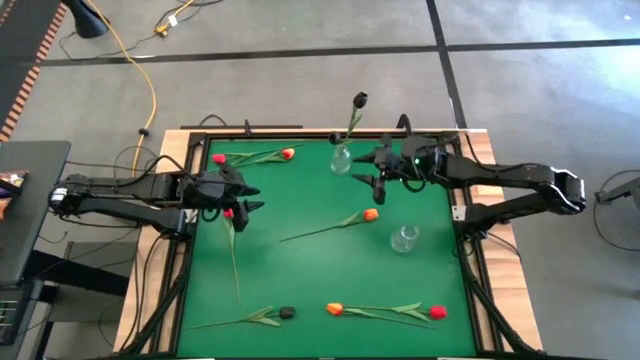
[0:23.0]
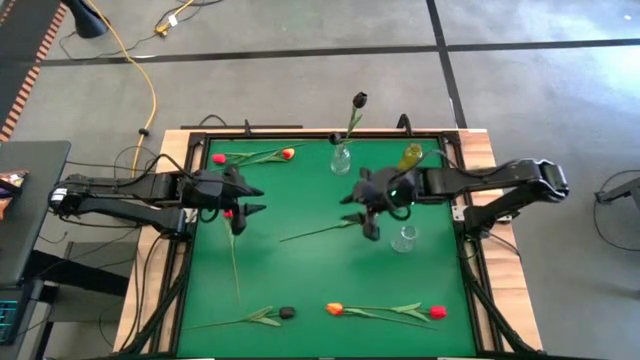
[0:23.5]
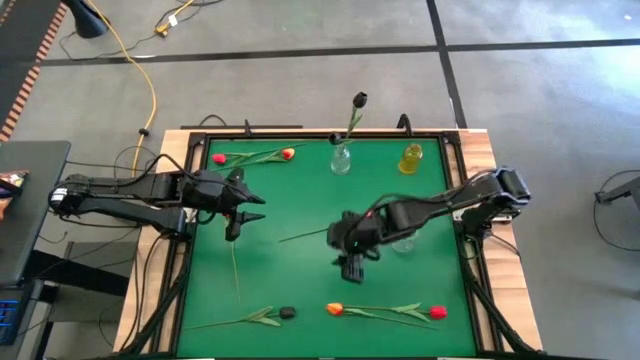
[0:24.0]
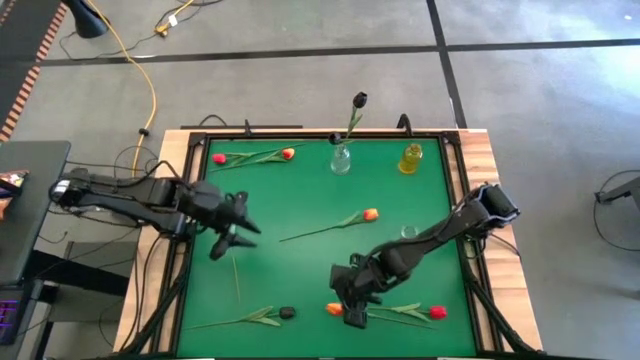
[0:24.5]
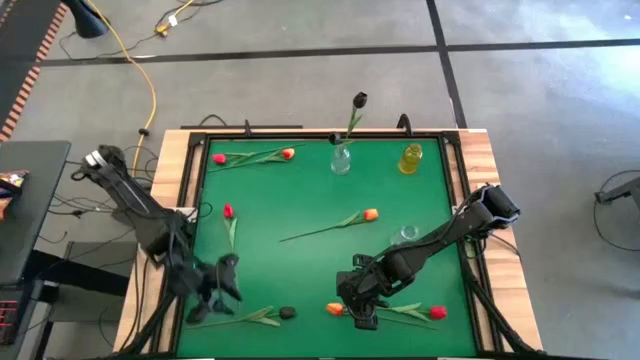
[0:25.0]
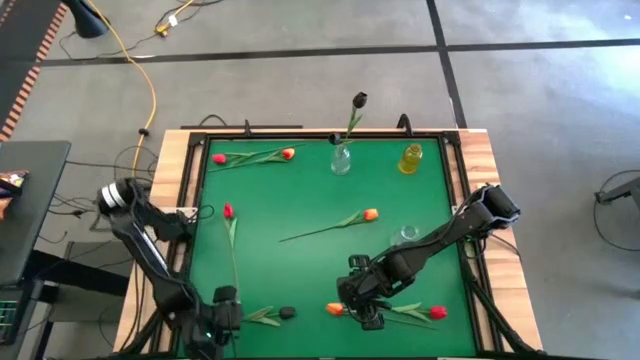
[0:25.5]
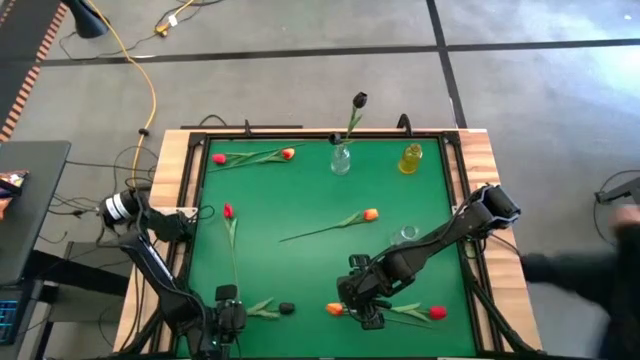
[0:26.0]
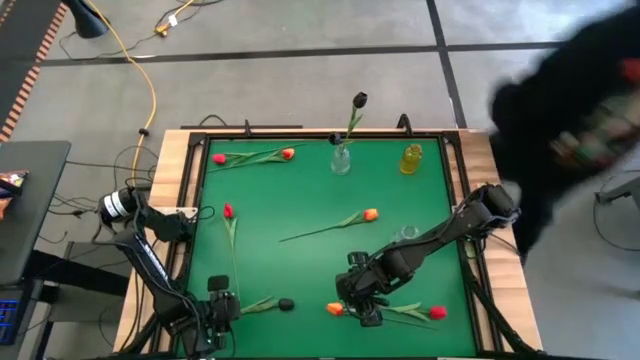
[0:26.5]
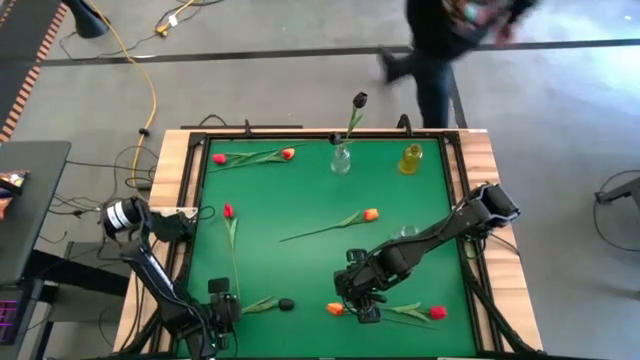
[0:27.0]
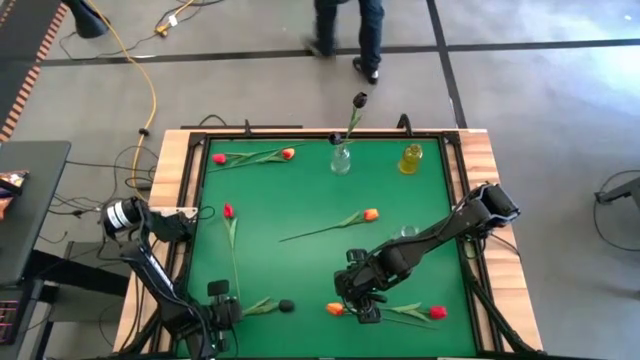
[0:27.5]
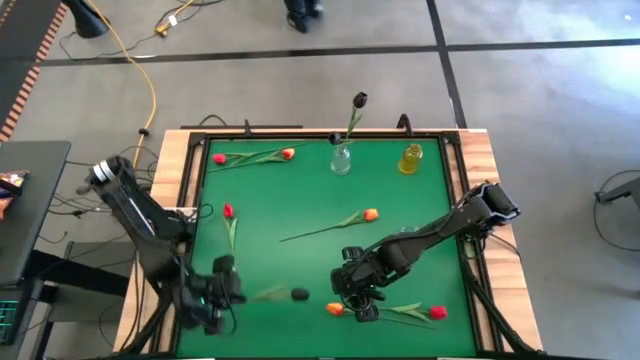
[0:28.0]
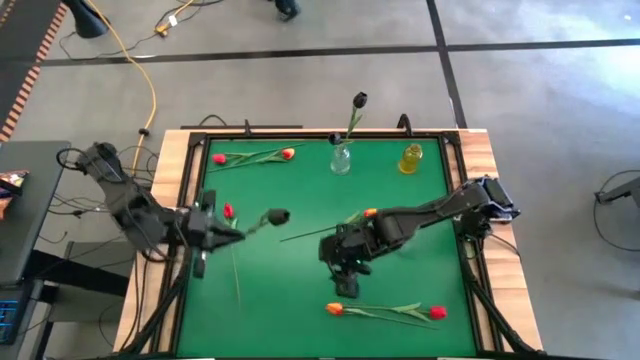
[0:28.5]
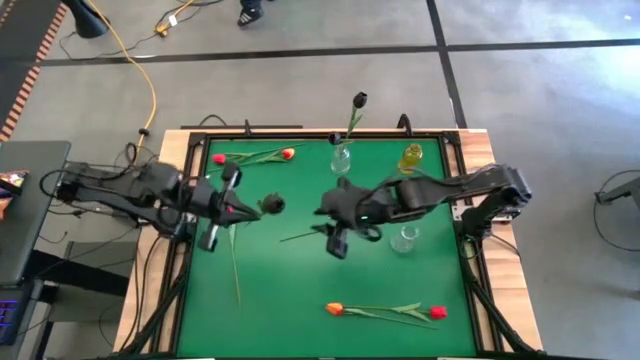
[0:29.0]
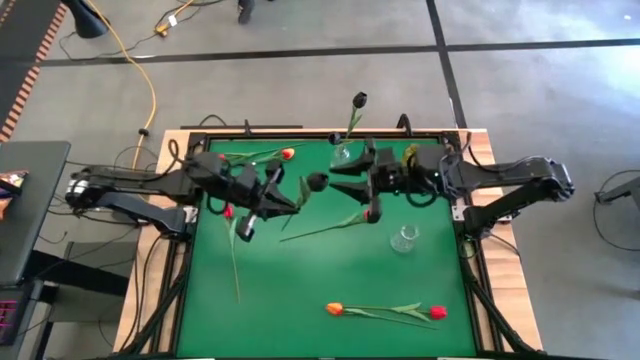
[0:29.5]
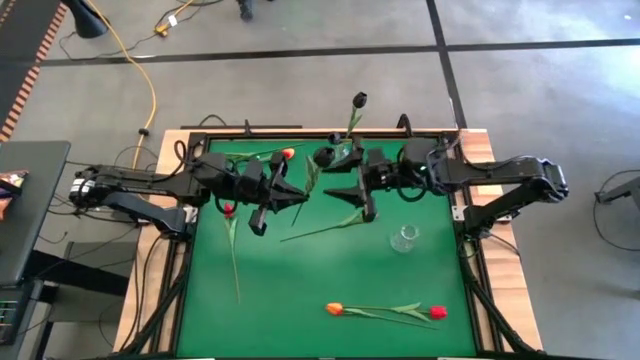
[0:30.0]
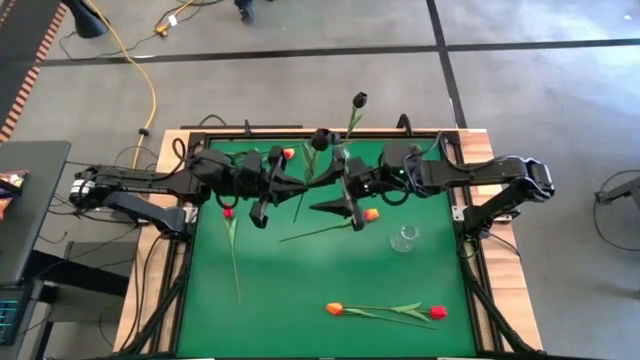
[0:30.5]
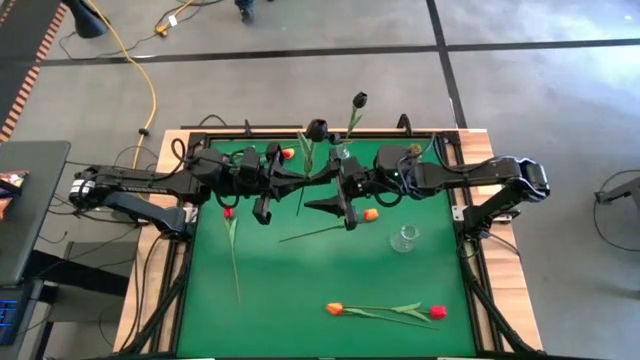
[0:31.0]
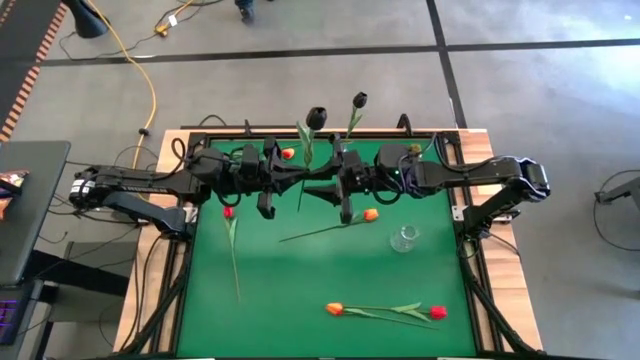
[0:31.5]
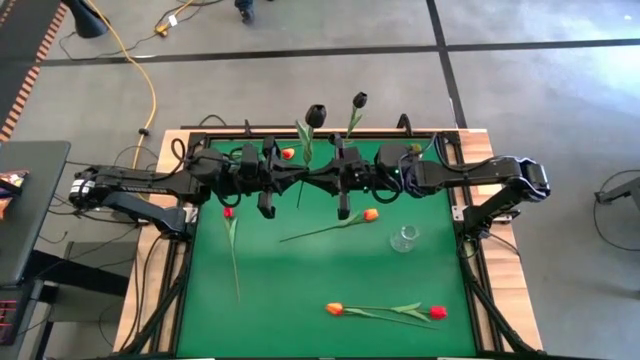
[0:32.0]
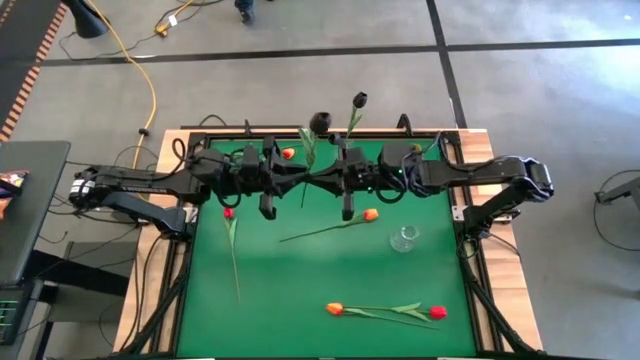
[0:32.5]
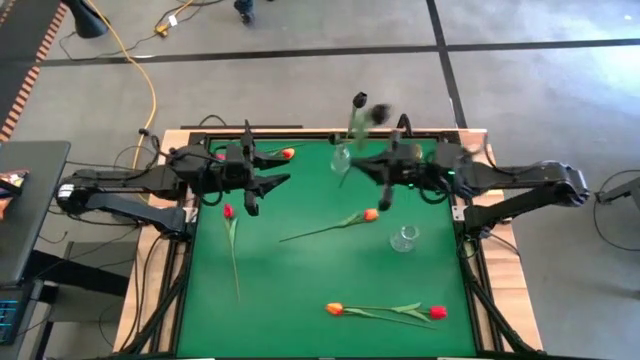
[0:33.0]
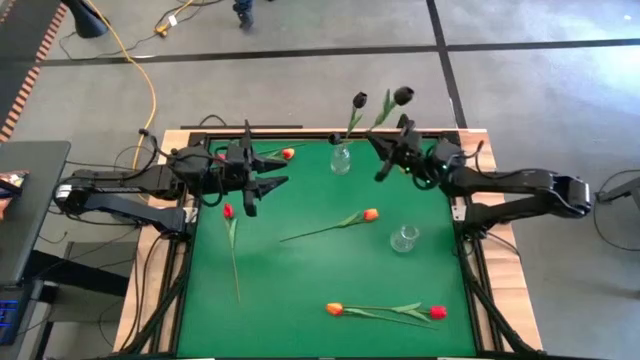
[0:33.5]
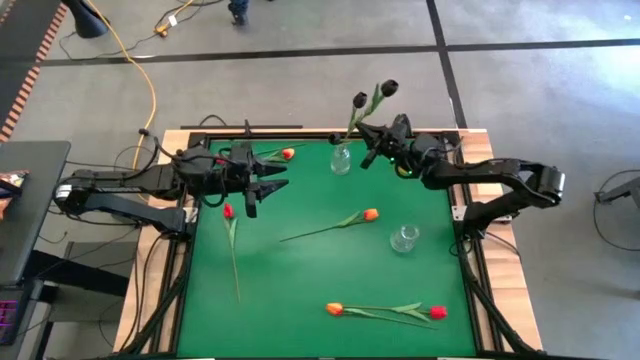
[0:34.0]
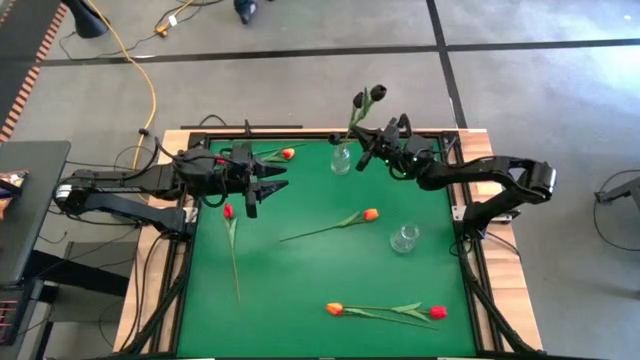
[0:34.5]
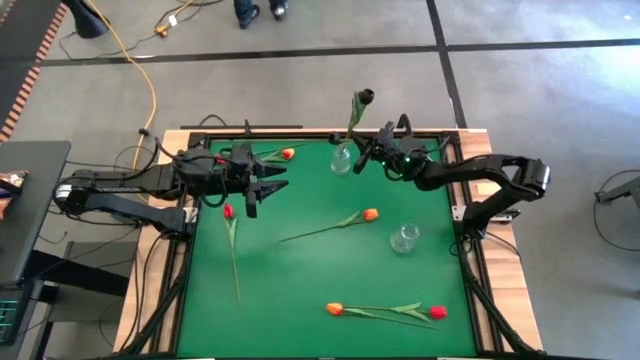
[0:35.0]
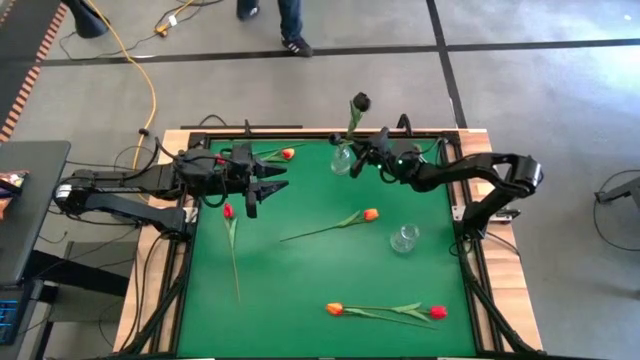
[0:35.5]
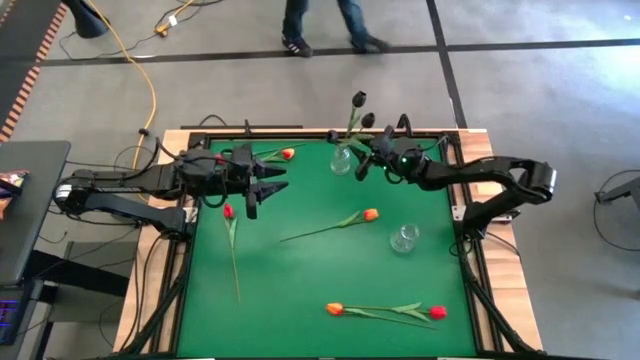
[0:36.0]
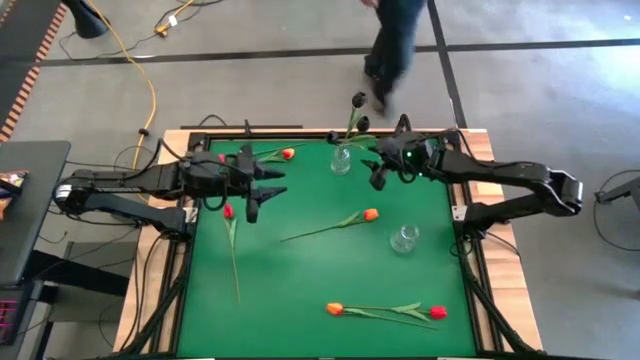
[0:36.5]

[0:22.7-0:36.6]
Task: Sort flowers into vase by color
Put the black flower into the top transparent vase

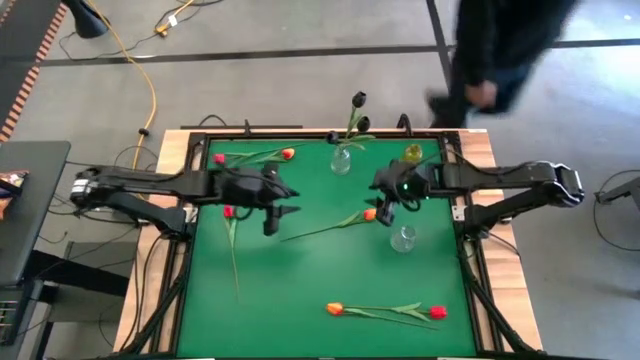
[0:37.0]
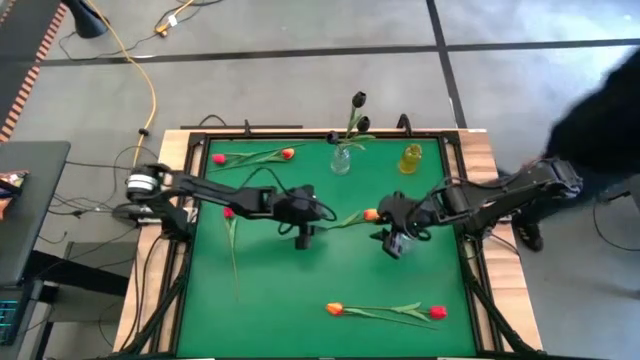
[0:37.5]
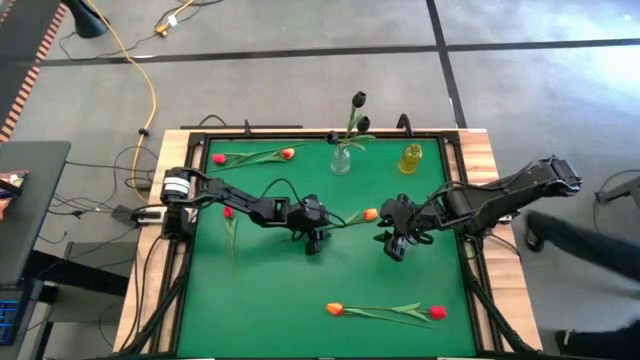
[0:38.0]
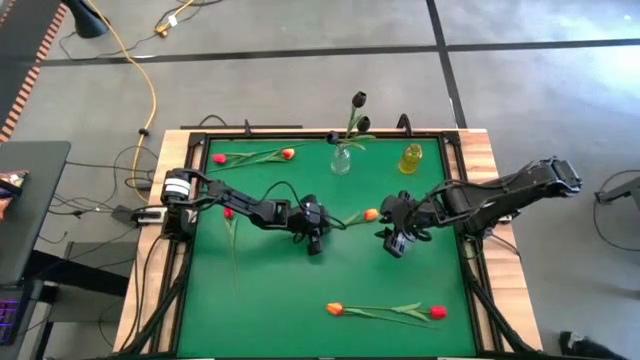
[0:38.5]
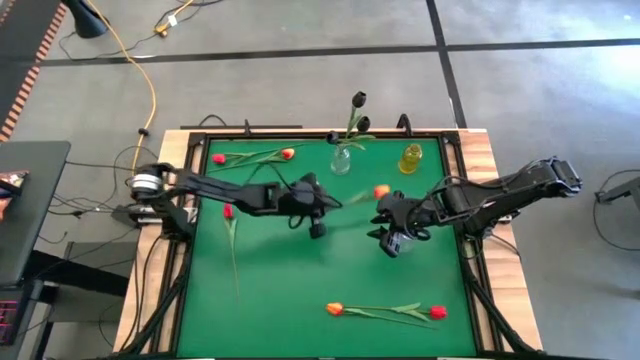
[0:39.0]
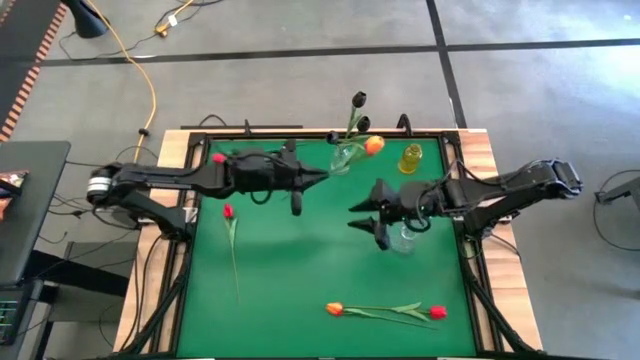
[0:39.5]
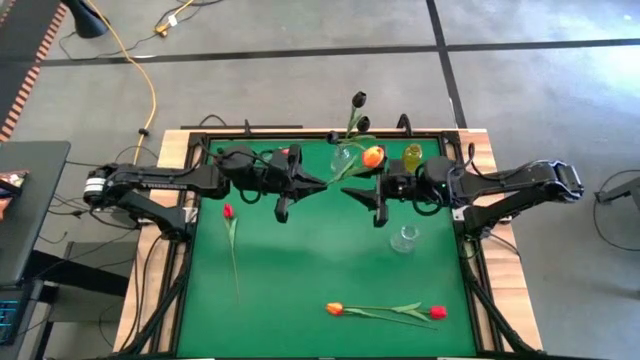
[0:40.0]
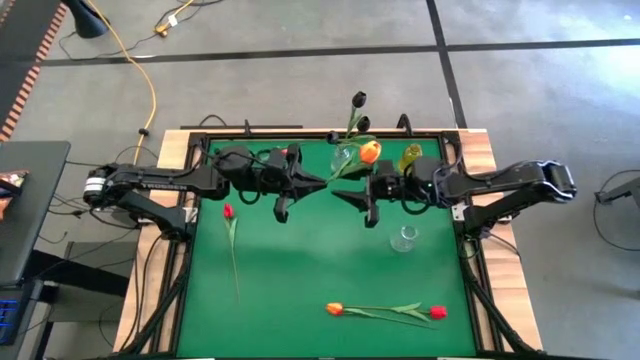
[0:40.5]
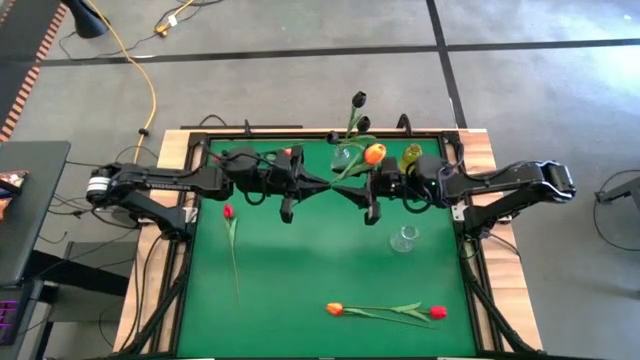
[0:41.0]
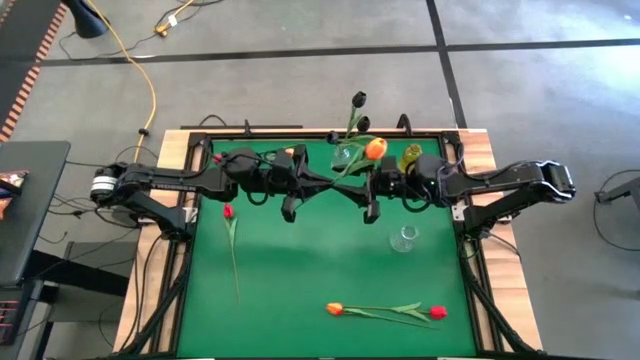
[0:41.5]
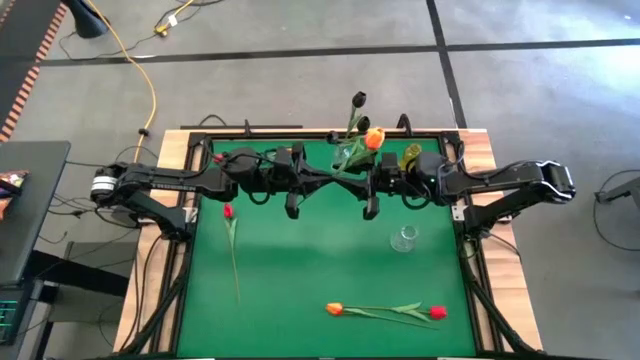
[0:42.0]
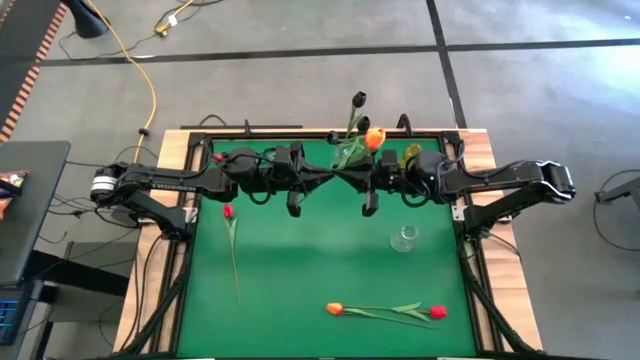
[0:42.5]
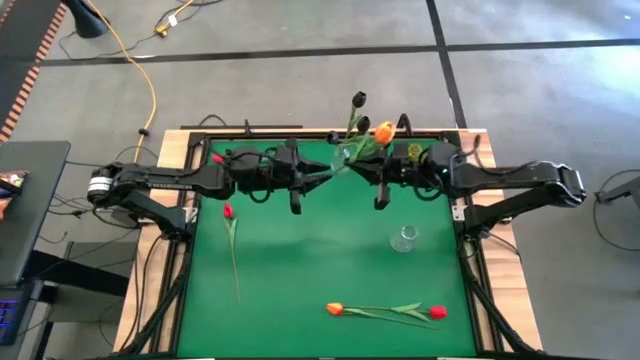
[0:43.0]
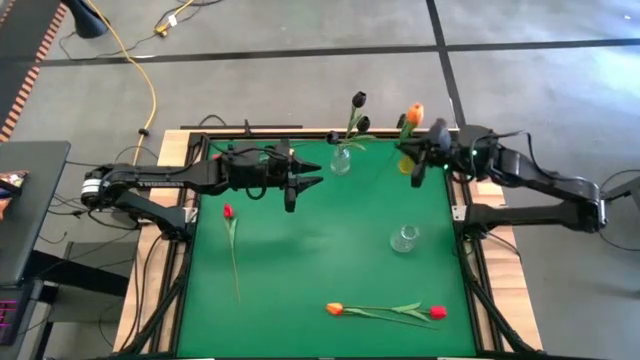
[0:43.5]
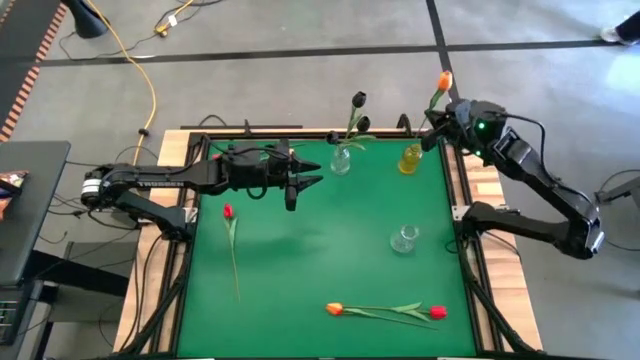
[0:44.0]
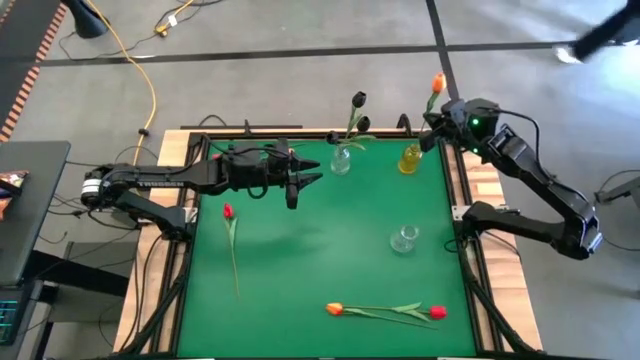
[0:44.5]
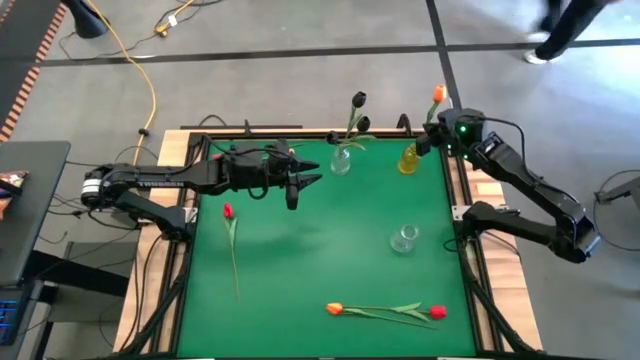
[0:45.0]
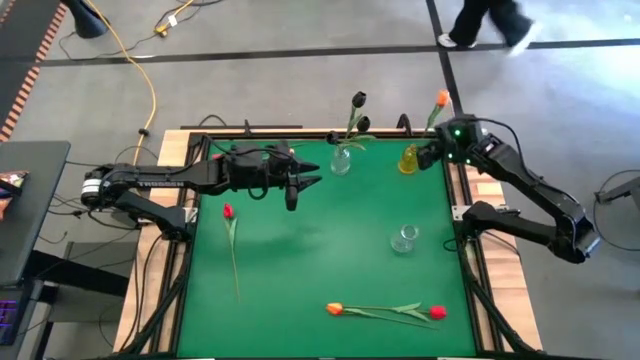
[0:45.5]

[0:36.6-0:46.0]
Put the center orange flower into the yellow vase
